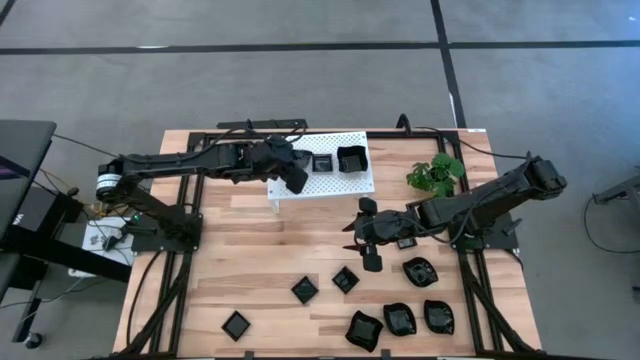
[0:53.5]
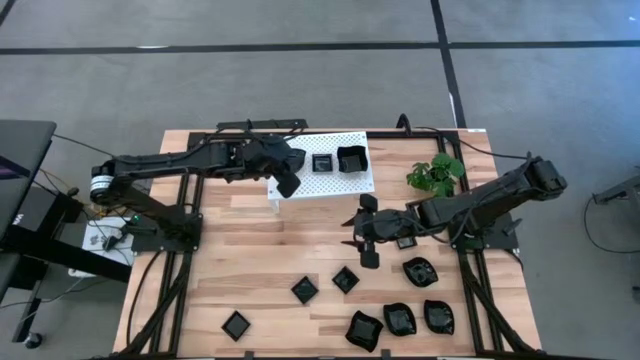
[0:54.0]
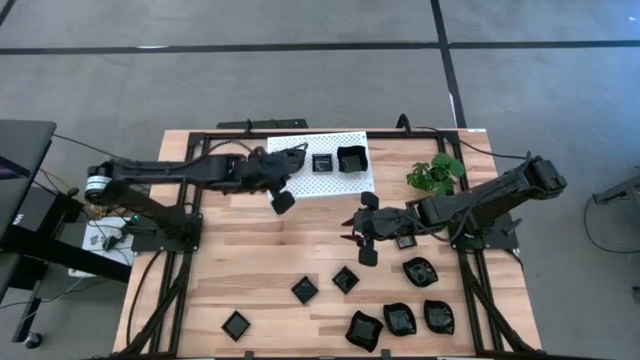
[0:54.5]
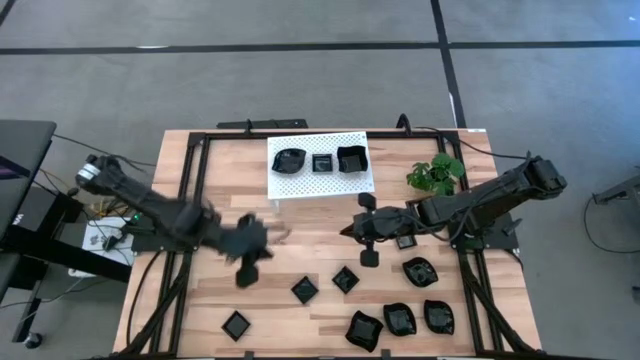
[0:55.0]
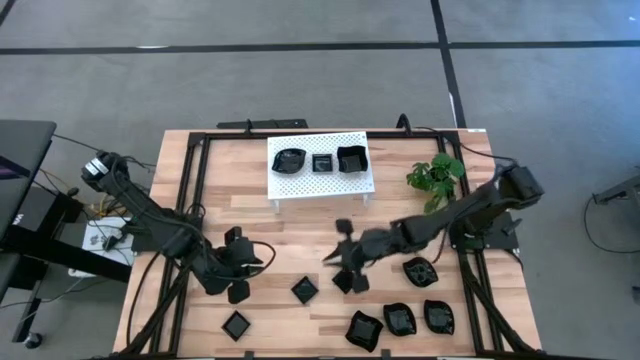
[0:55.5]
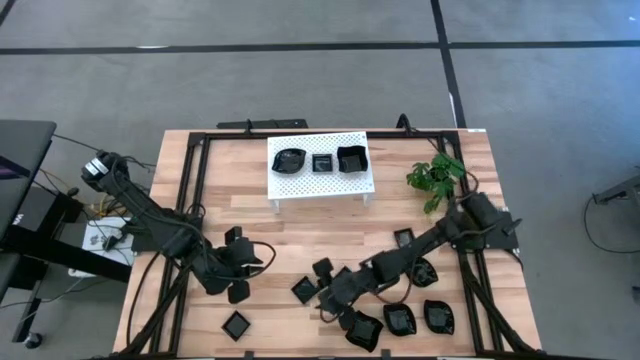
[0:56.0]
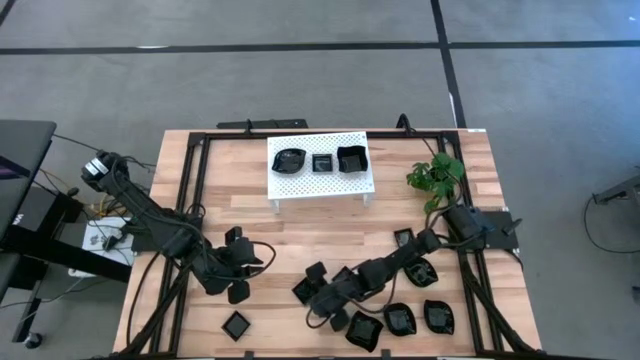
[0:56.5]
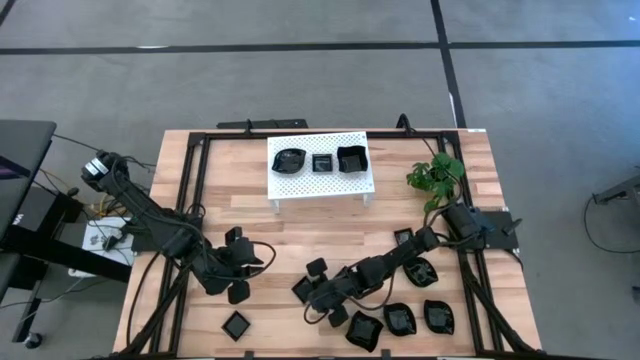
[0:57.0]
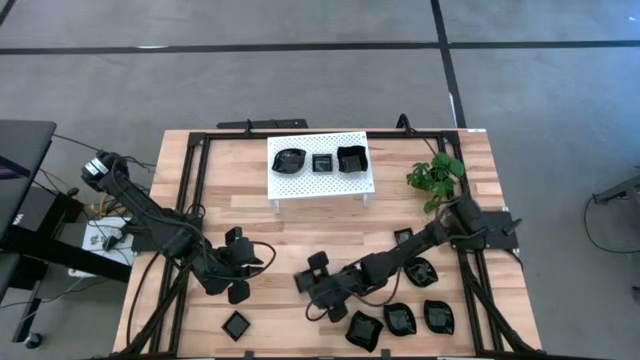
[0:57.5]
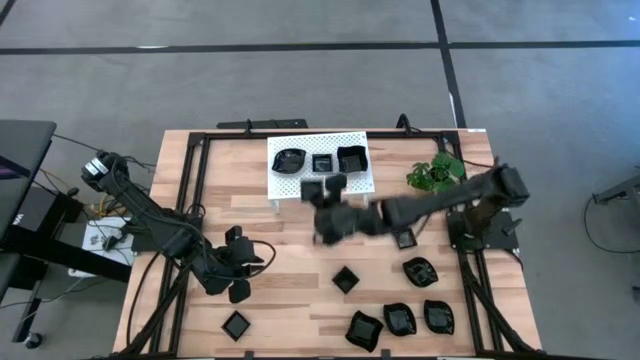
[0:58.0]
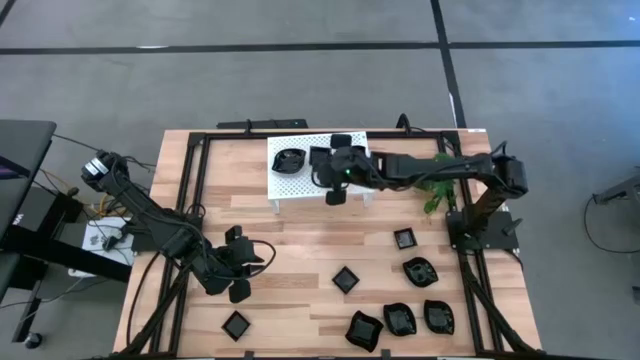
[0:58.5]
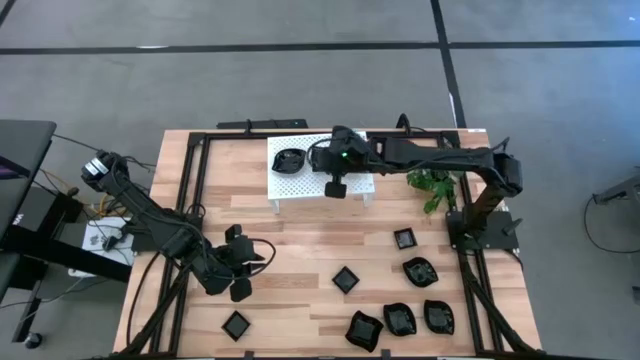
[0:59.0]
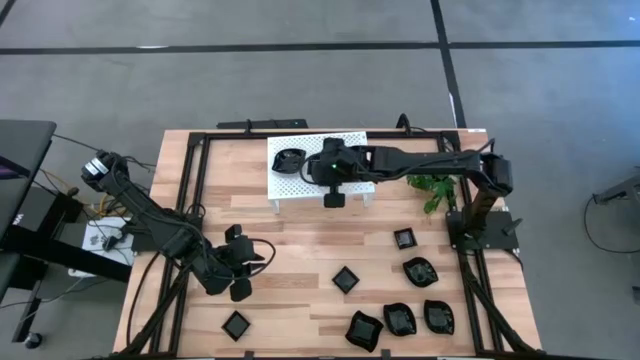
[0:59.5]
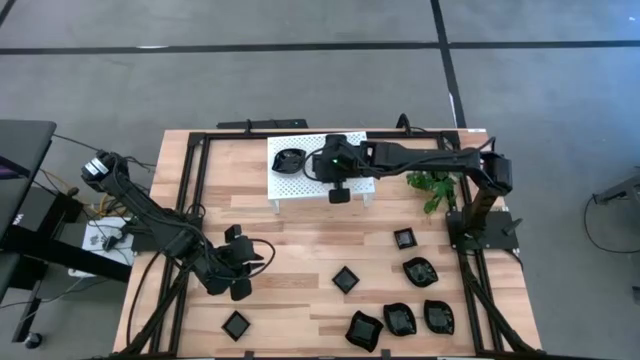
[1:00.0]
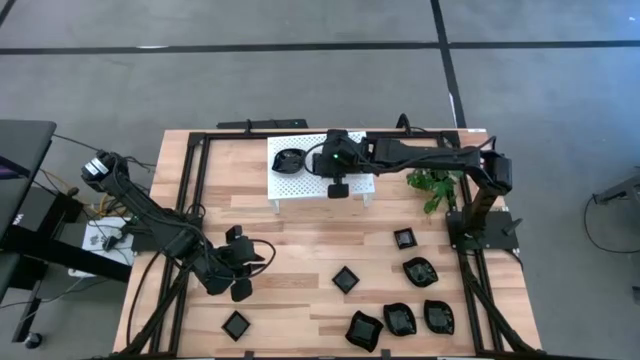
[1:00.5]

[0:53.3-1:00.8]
Task: Pick & Place Mini shaped plates
Stack the square plate on top of the square plate on the shelf

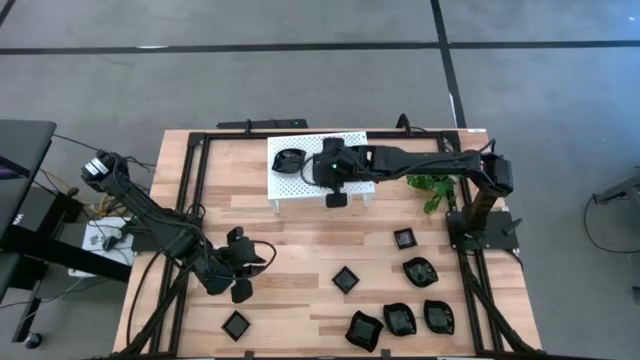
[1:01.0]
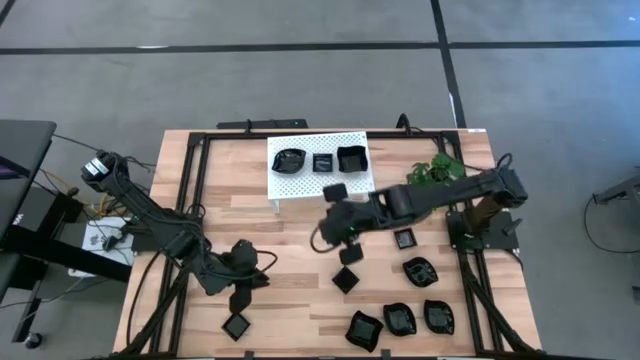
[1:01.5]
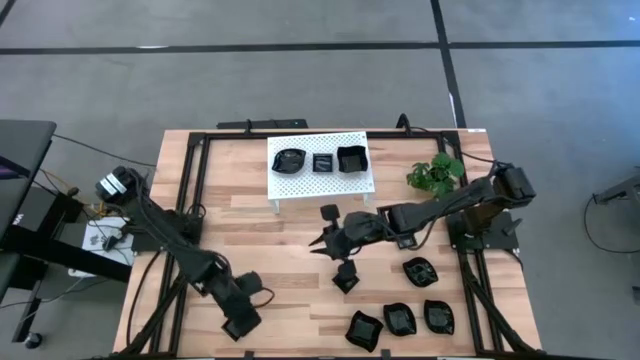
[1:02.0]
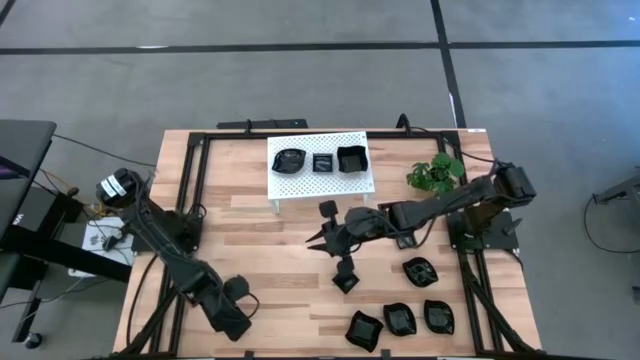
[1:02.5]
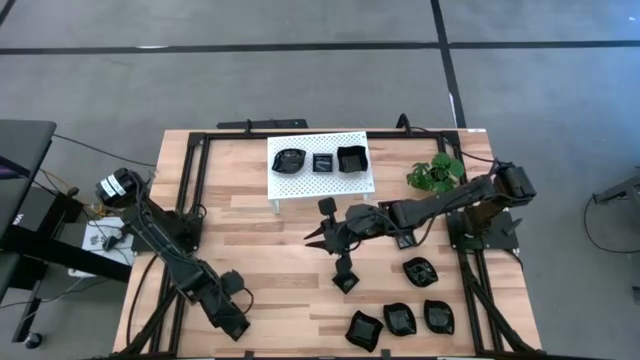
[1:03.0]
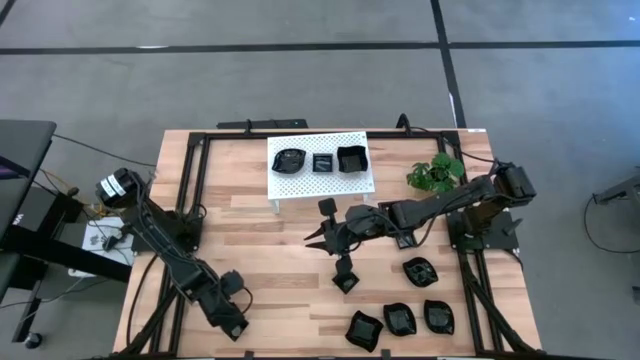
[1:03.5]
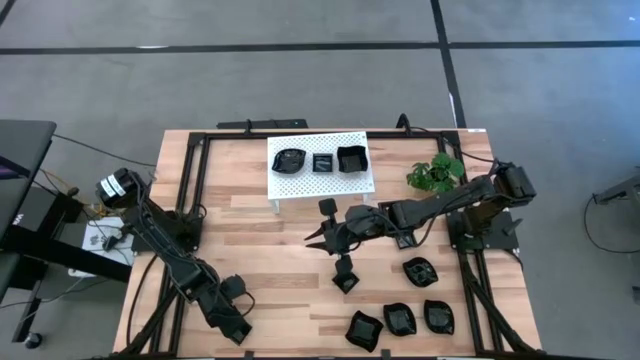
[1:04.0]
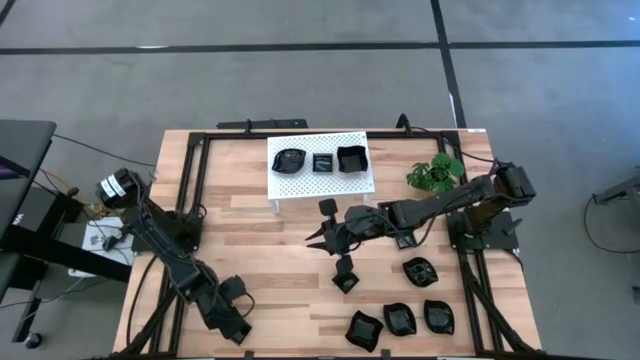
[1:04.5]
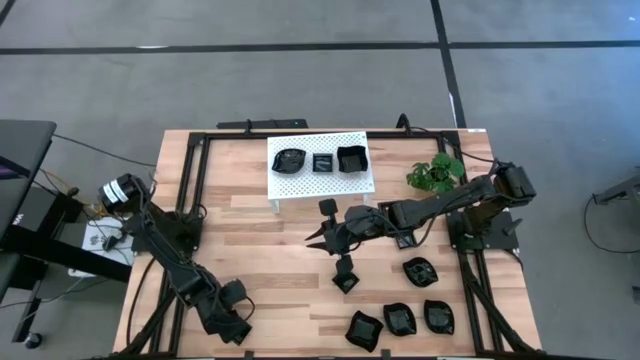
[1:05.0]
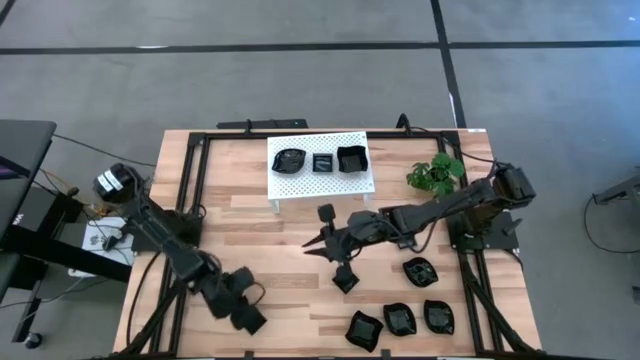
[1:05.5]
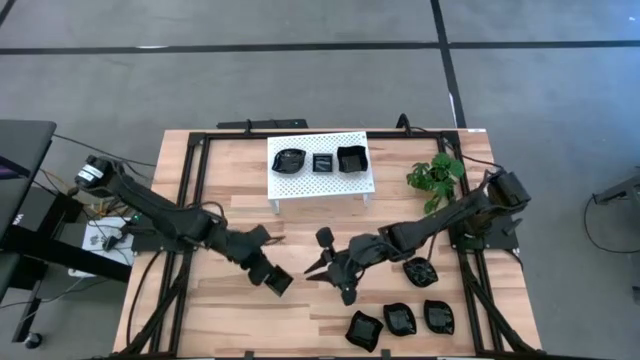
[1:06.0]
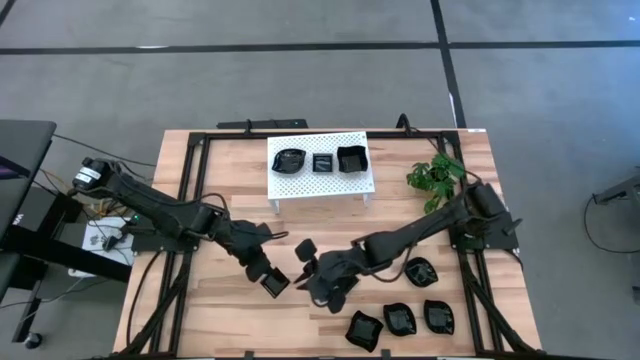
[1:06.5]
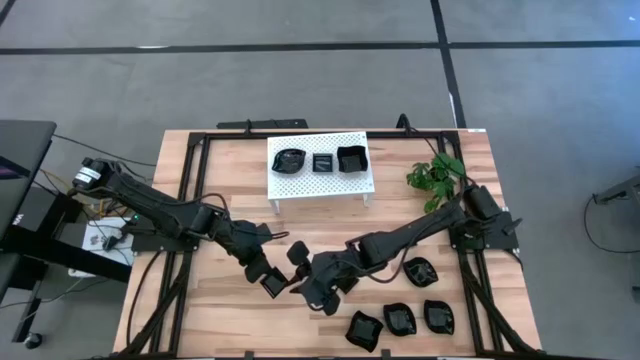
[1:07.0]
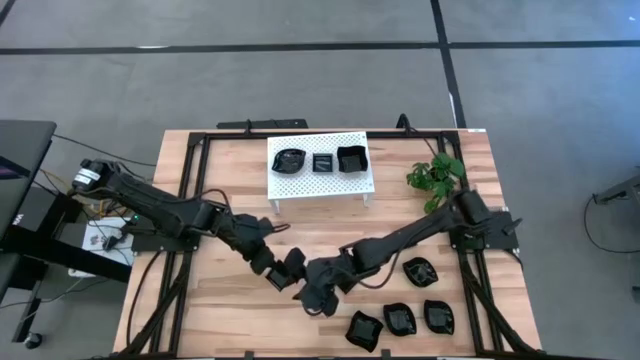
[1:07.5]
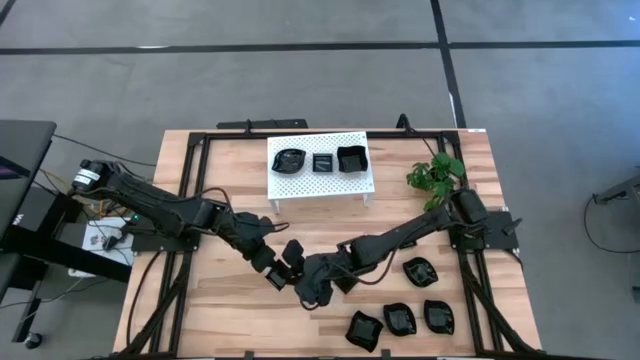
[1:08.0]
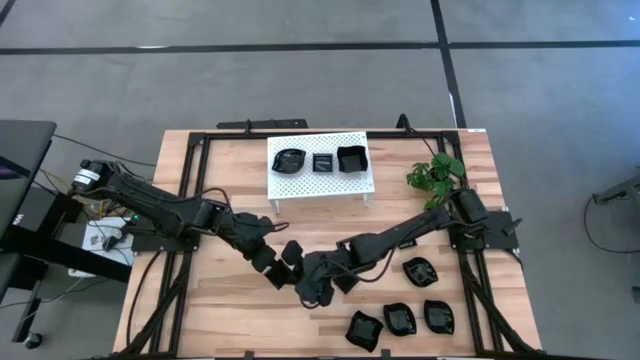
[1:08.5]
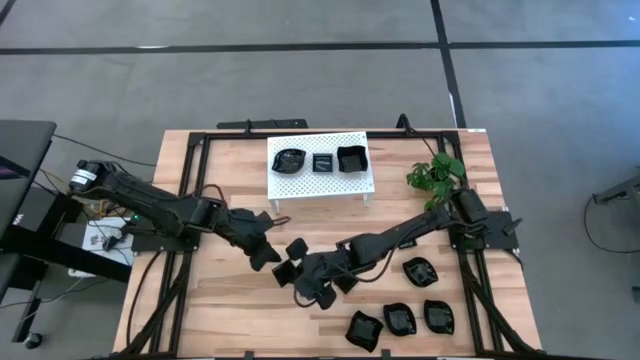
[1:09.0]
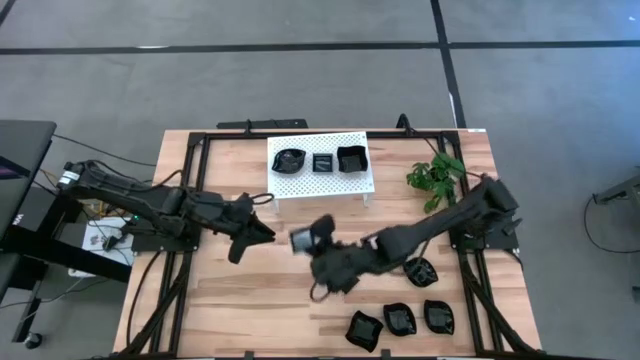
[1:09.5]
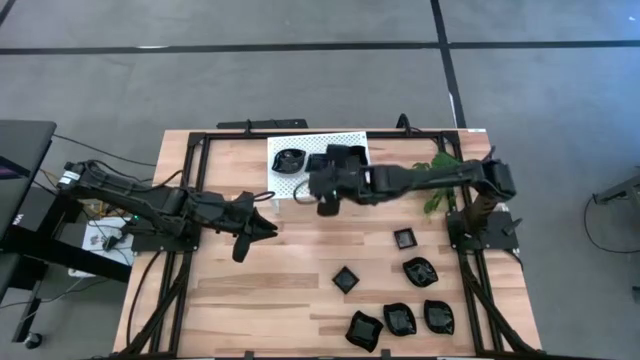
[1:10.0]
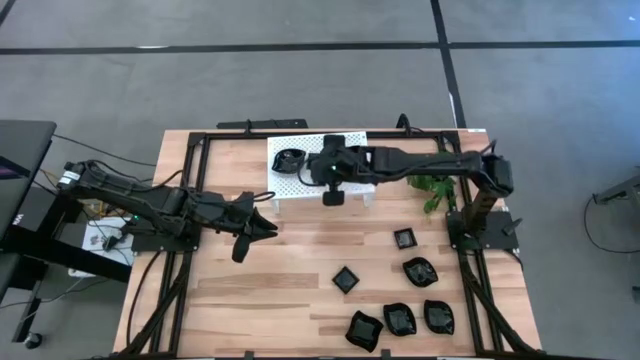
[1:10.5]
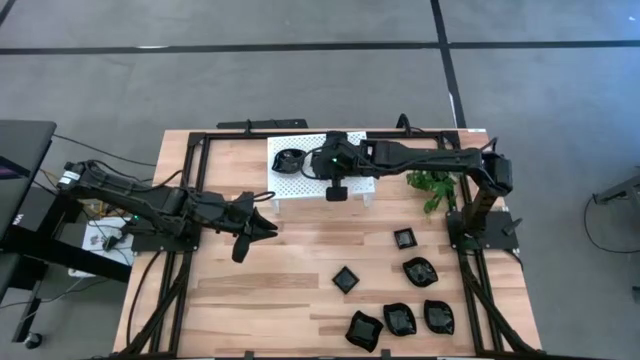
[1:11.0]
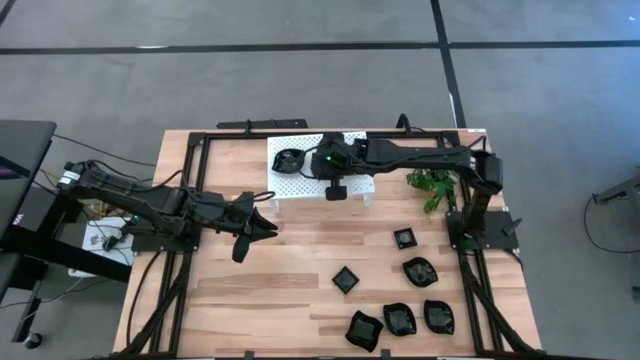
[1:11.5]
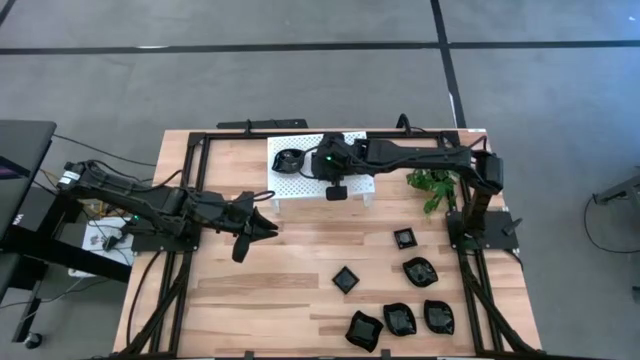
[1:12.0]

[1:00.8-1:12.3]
Stack the square plate on top of the square plate on the shelf

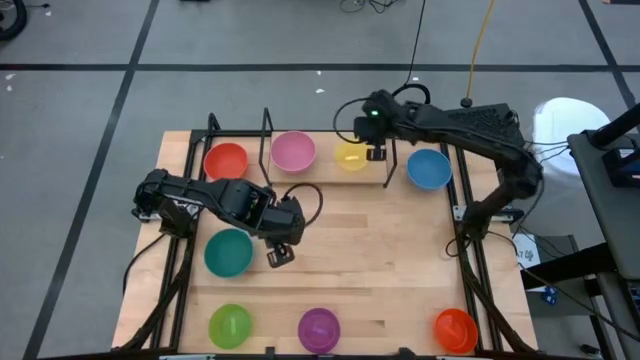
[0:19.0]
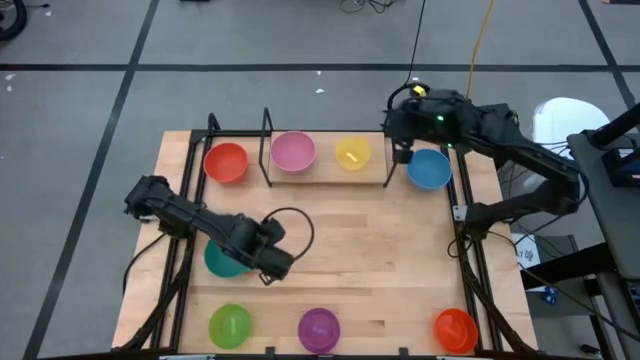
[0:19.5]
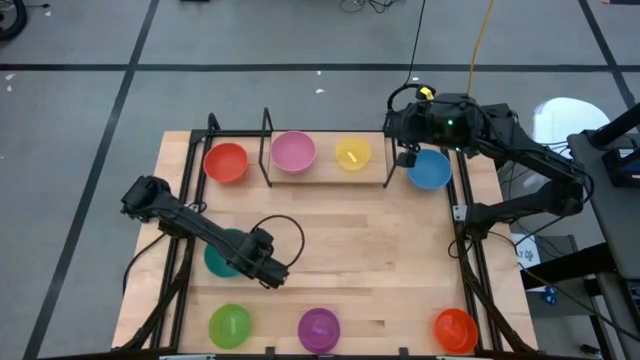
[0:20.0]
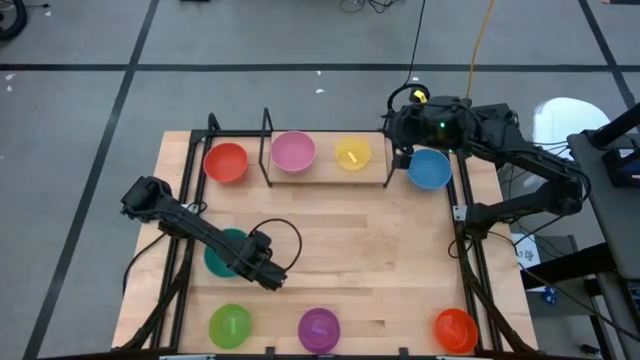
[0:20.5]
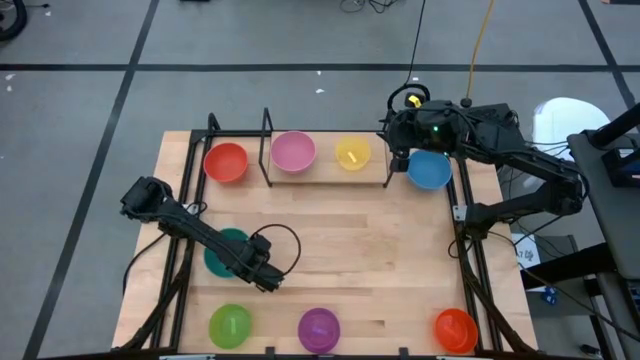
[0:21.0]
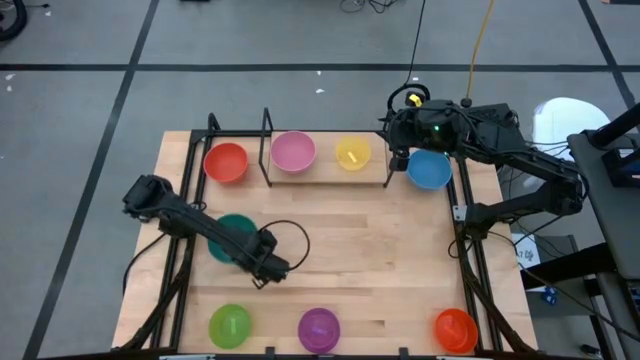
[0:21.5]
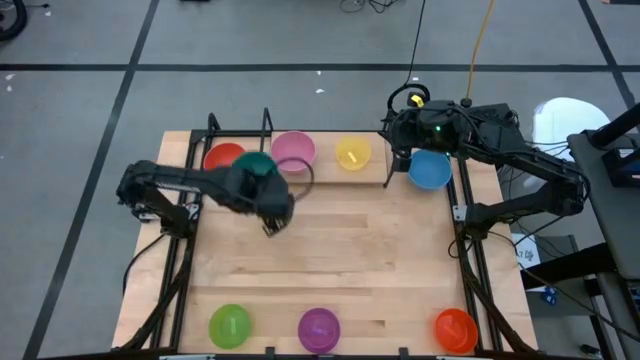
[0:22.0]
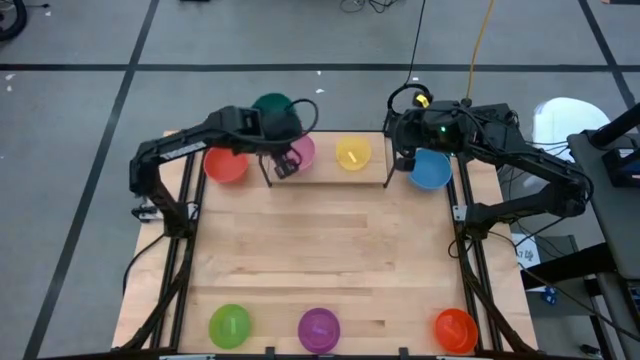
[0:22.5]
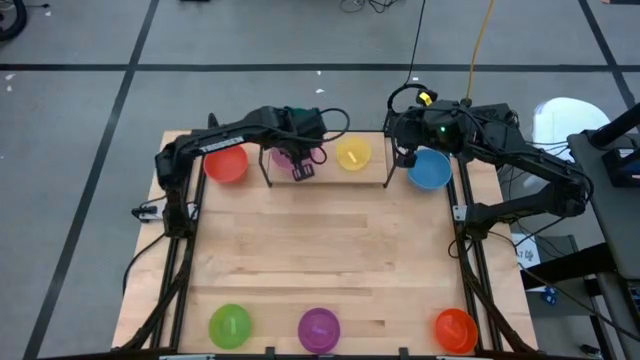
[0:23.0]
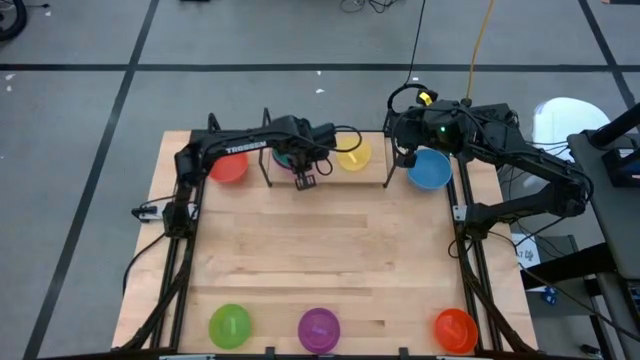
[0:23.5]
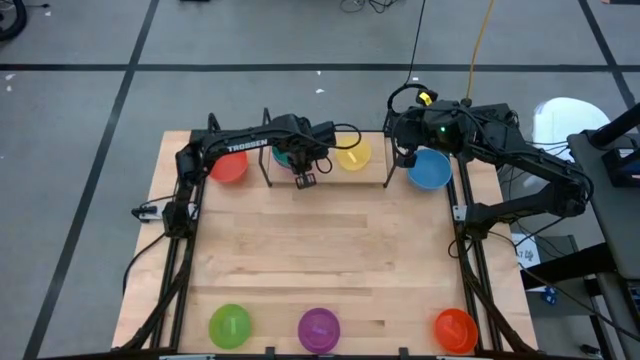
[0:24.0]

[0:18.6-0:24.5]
Task: Place and stack bowls onto a shelf
Stack the green bowl on top of the pink bowl on the shelf
